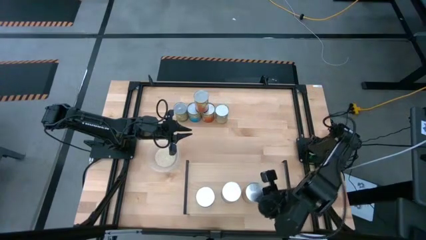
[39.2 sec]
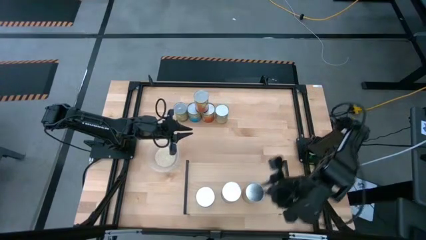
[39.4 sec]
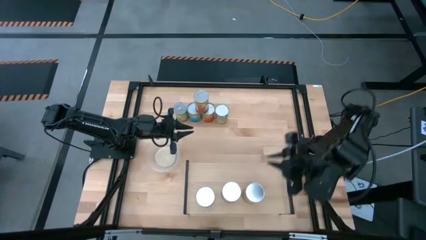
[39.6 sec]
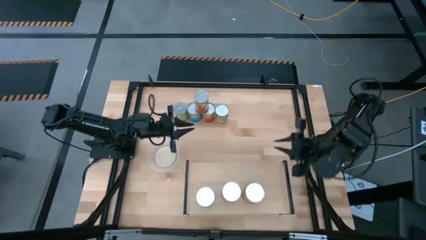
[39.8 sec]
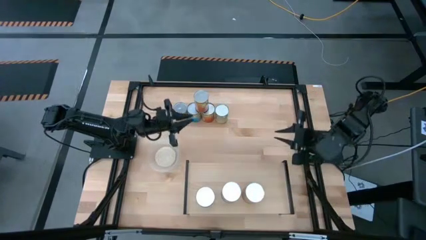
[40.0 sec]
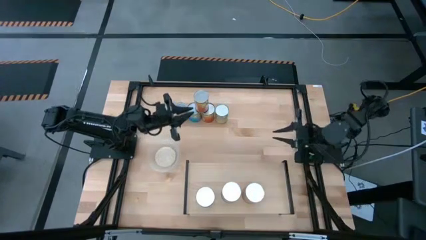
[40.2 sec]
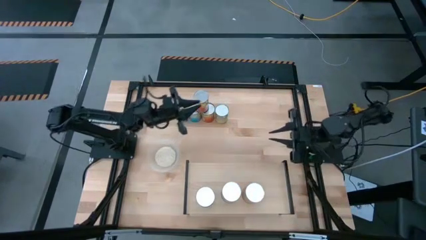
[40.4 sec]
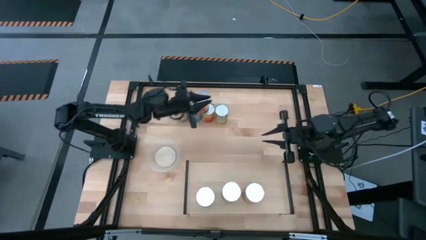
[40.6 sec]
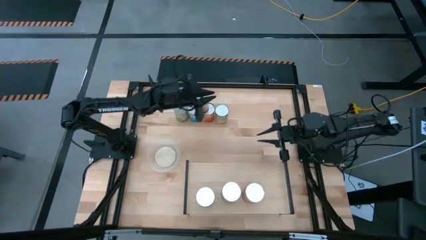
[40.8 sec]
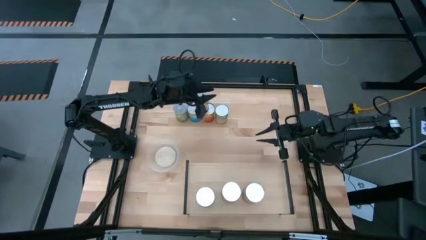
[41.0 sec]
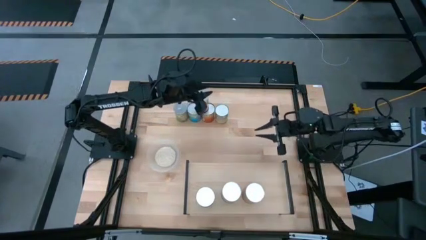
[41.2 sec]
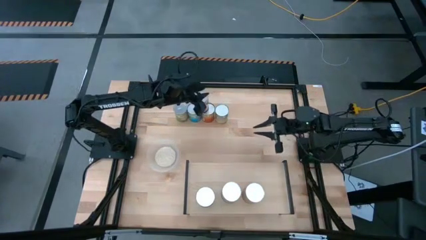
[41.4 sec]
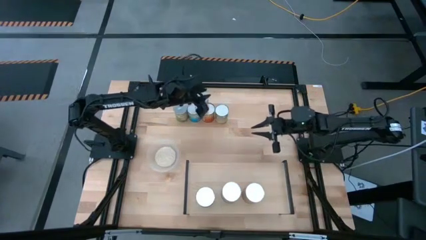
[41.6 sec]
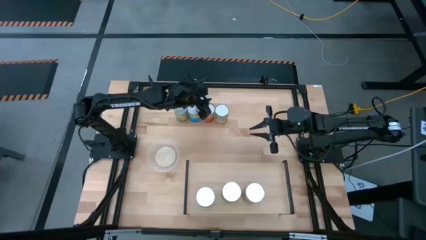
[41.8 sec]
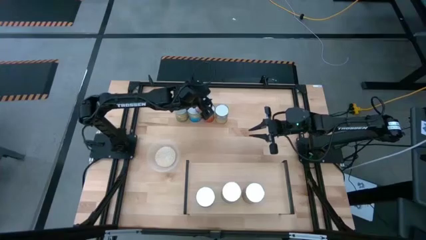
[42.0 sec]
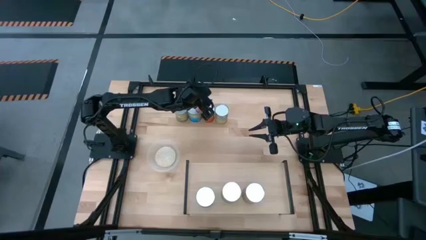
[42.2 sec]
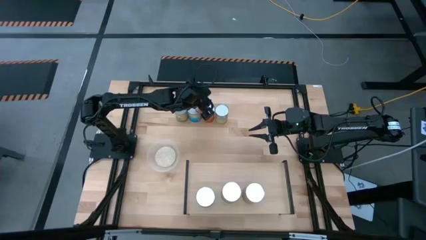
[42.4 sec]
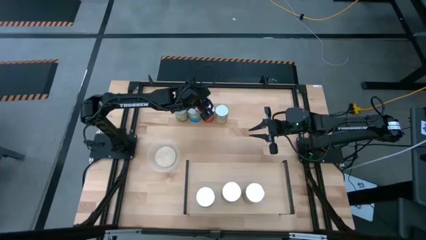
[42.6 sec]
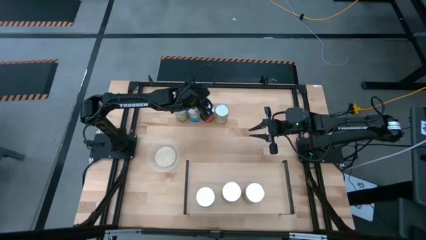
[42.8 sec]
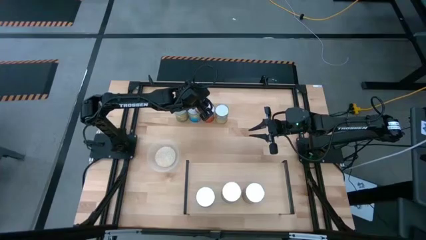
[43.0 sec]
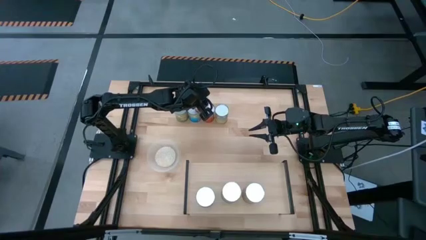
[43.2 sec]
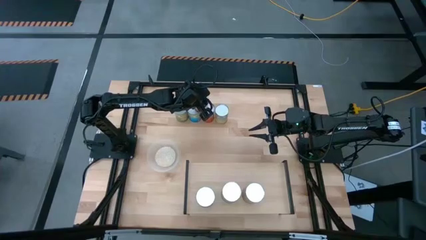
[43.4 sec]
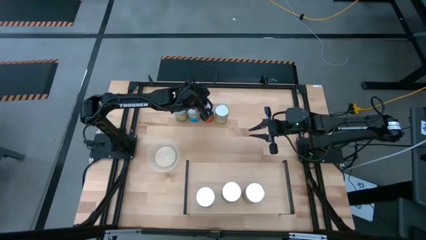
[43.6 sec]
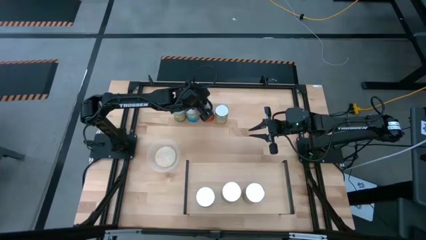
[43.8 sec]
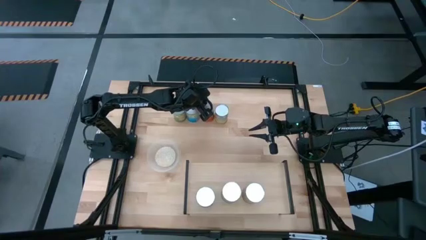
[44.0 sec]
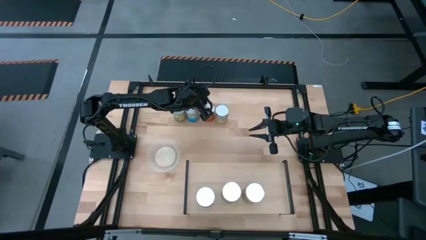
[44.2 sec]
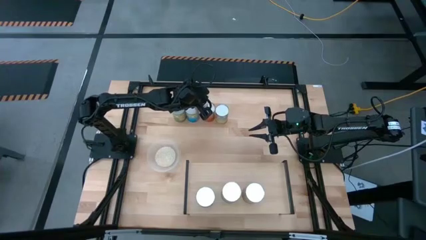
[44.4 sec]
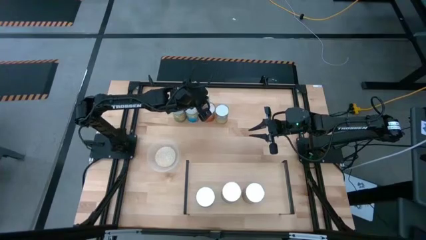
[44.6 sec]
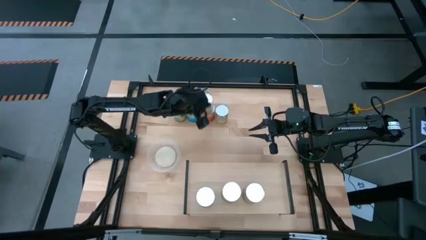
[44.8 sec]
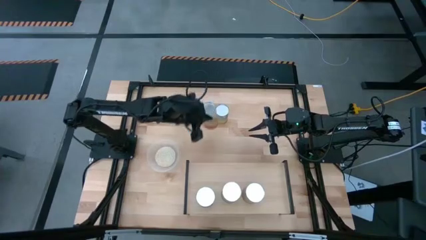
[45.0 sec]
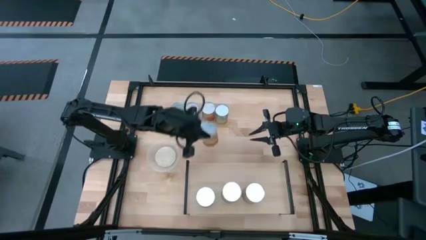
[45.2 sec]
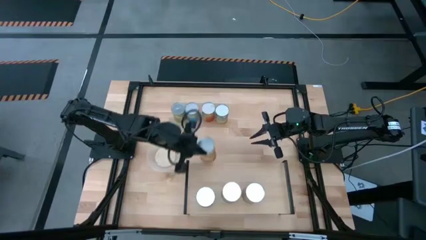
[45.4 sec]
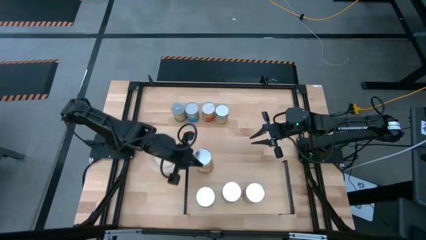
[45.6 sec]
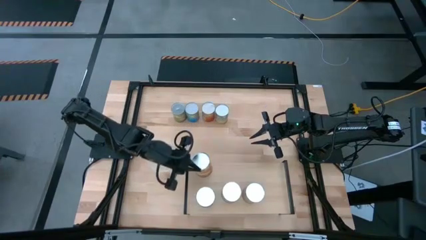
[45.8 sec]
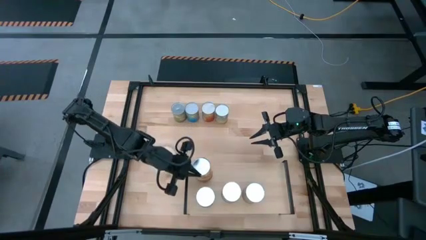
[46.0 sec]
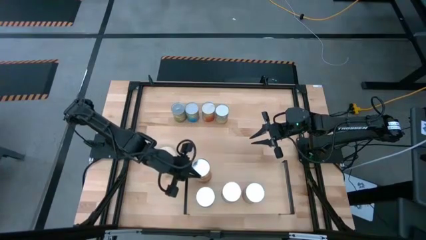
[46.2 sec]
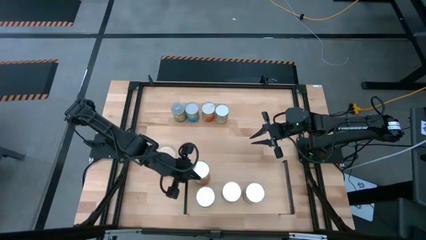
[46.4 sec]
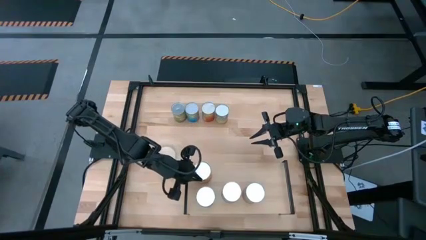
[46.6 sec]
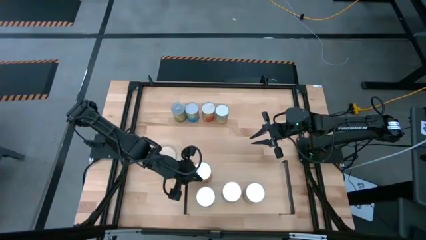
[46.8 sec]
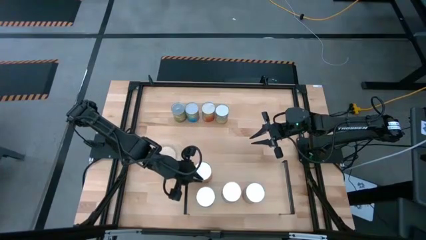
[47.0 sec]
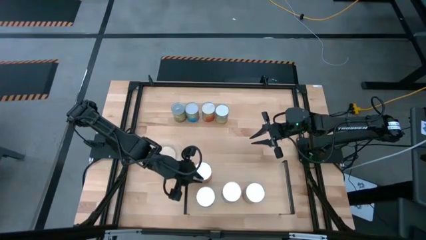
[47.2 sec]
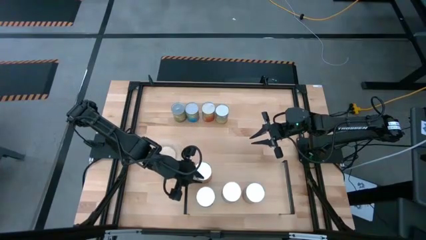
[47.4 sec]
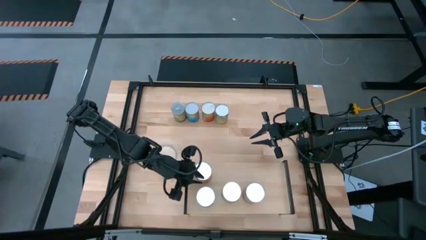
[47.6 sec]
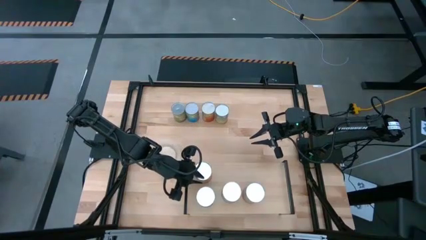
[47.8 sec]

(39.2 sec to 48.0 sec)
Task: Pick and place cans onto a shelf
Put the canned corn on the shelf

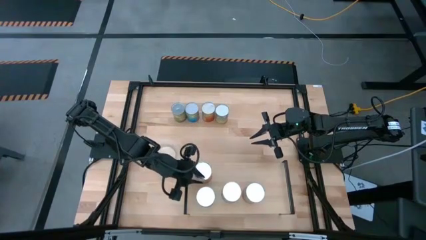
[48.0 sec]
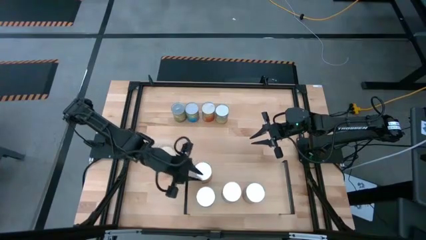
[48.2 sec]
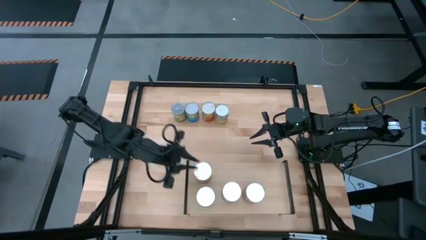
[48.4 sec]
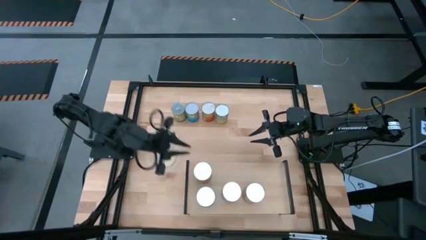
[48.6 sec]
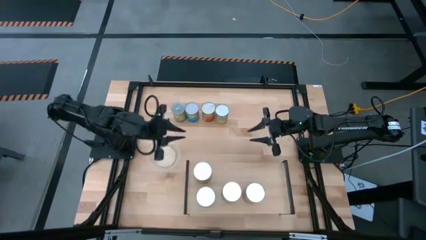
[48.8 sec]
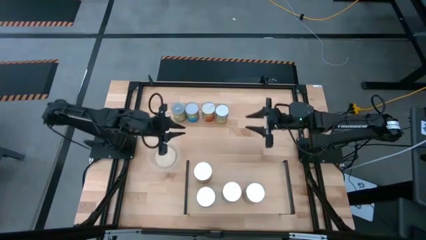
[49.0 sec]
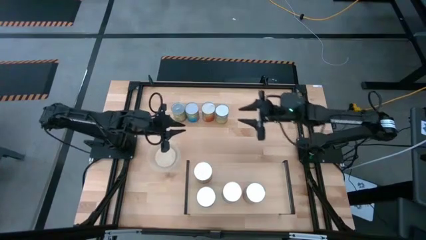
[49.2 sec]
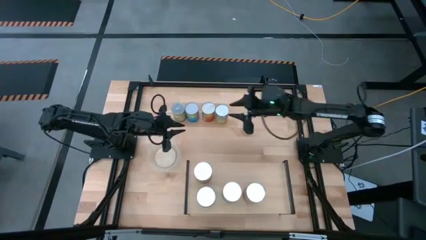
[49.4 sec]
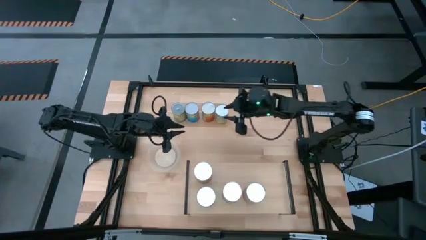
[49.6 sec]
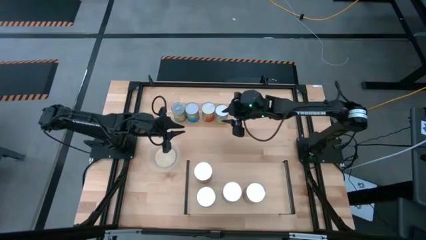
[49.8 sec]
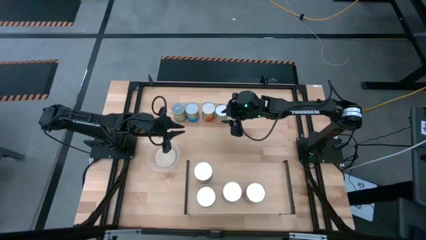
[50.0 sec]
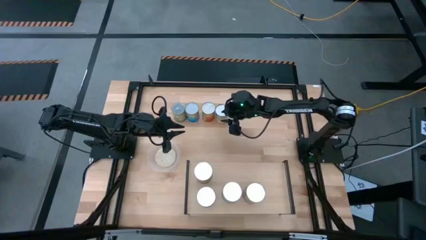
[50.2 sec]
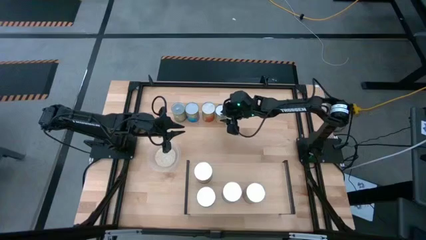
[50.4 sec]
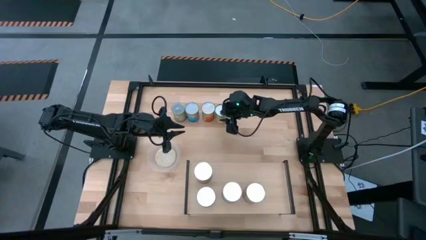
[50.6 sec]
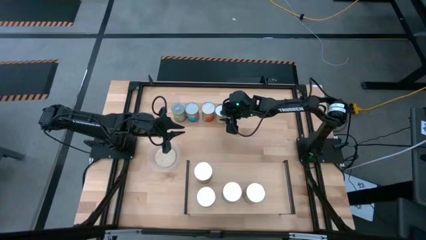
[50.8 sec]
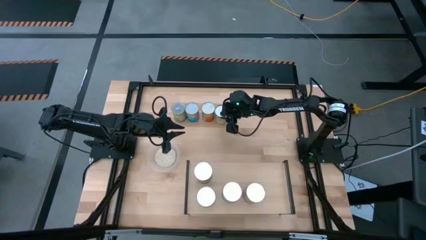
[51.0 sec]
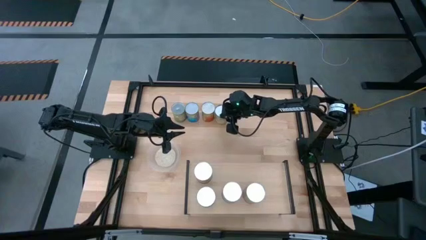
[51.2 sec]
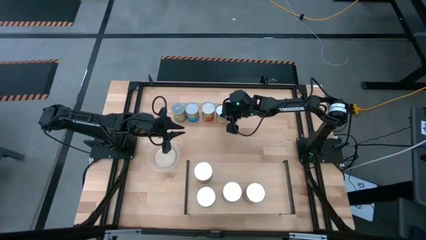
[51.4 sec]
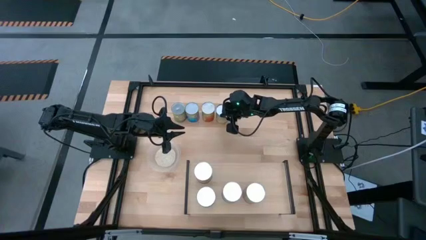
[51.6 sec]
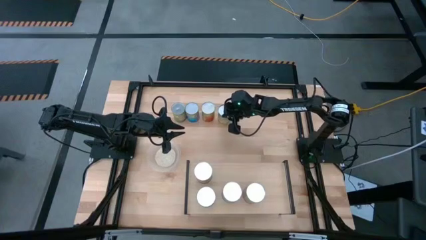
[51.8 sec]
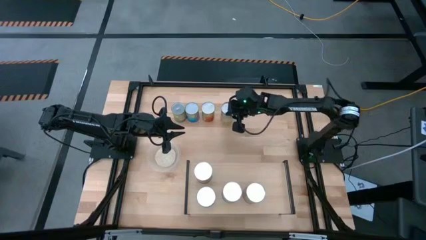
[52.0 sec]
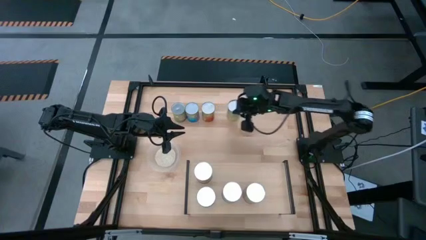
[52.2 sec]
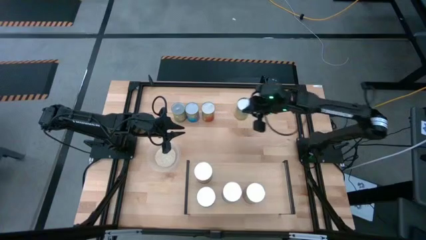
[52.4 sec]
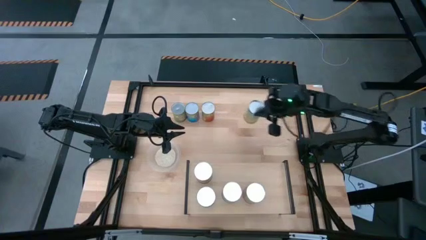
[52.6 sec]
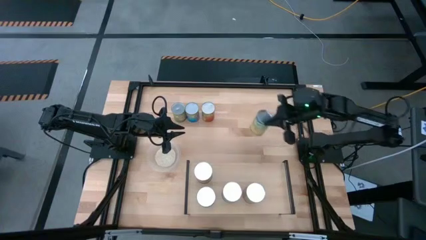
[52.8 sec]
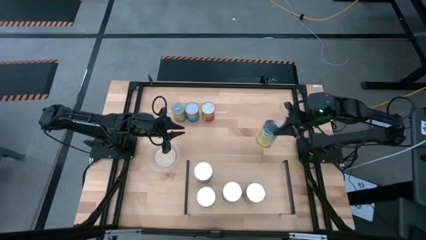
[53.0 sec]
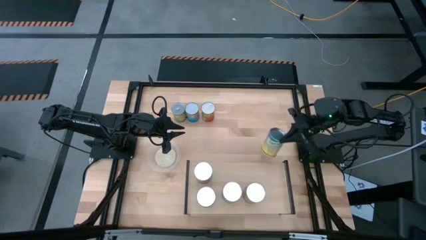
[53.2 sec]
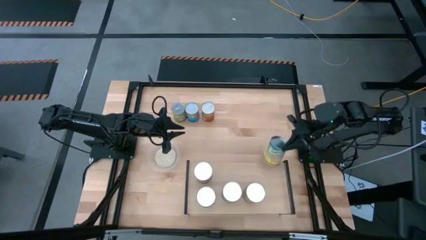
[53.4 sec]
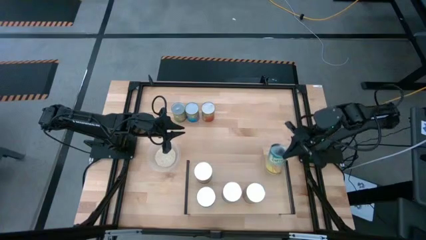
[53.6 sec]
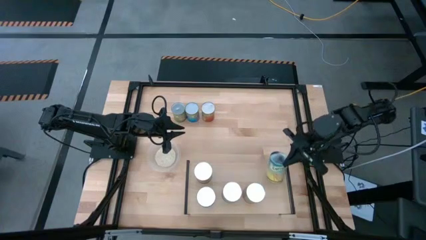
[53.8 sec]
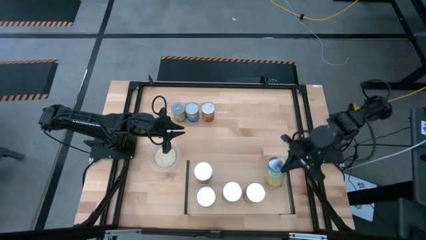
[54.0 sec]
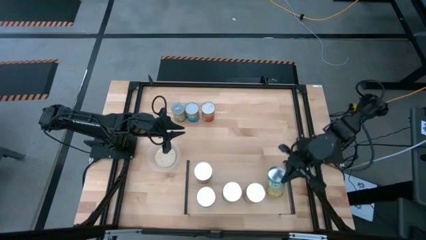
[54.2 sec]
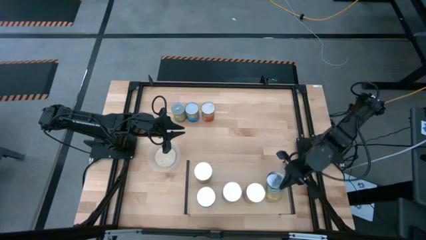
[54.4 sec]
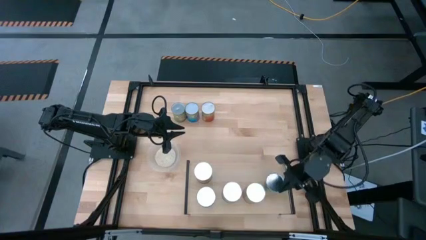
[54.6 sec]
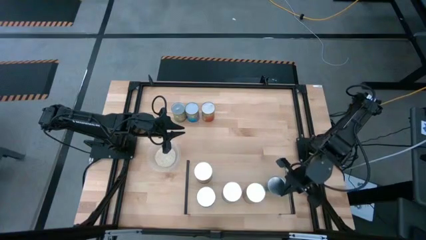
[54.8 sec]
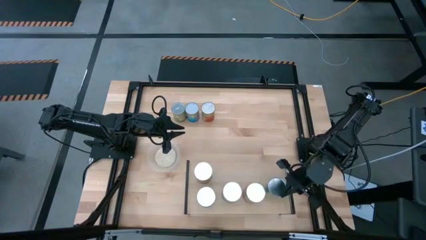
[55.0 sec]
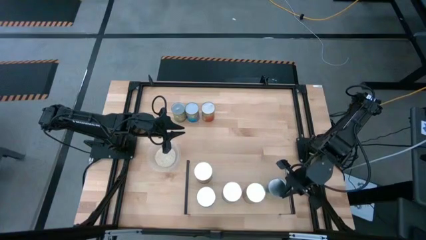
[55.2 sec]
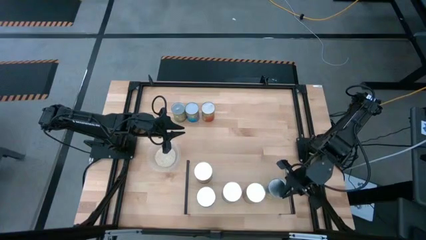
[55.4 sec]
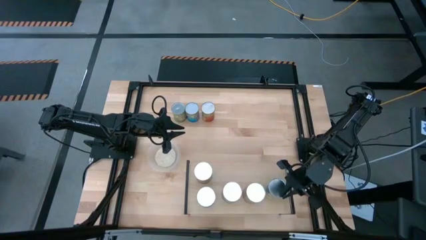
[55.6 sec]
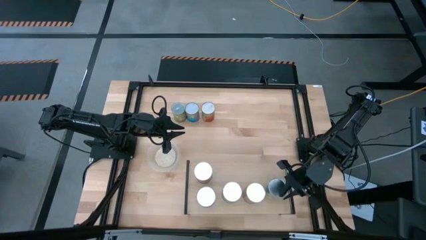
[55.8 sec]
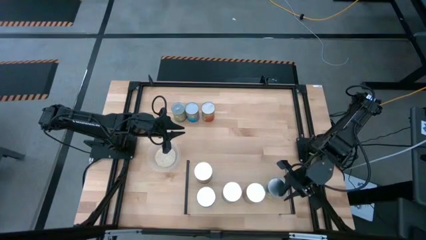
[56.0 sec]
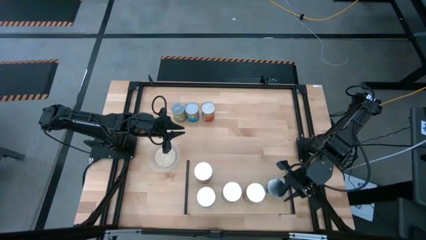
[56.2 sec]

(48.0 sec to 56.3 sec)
Put the canned carrots on the shelf
